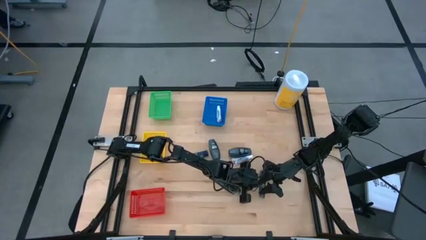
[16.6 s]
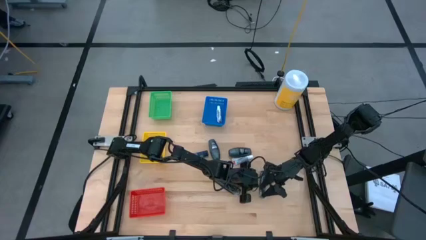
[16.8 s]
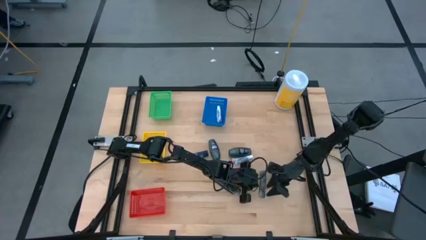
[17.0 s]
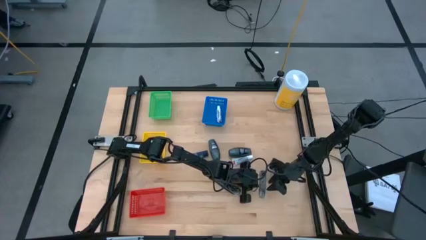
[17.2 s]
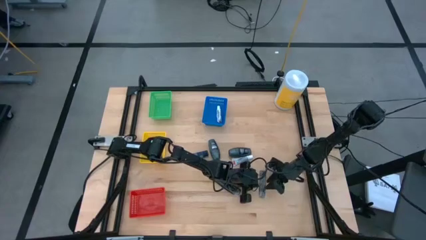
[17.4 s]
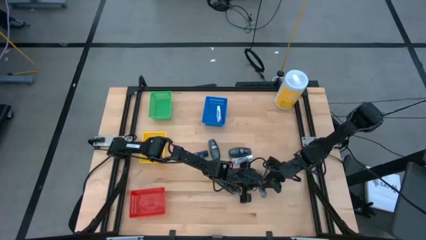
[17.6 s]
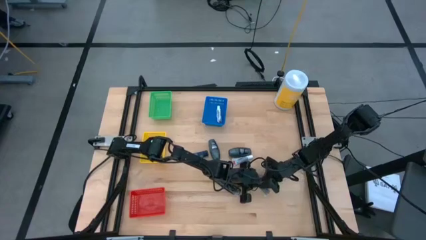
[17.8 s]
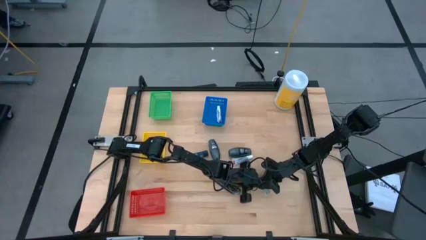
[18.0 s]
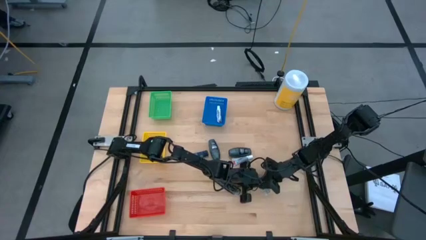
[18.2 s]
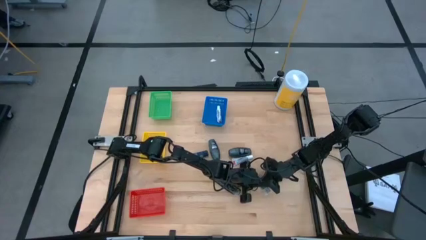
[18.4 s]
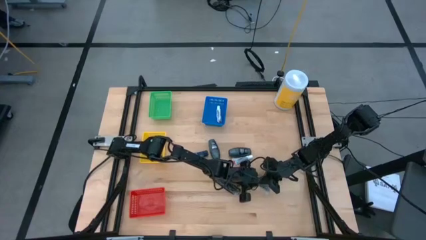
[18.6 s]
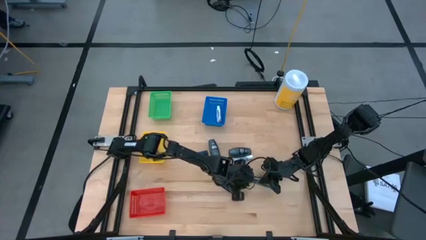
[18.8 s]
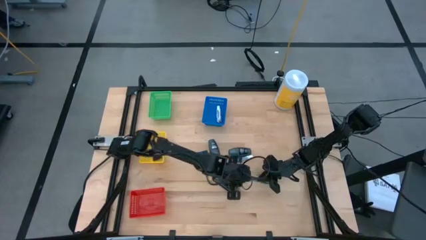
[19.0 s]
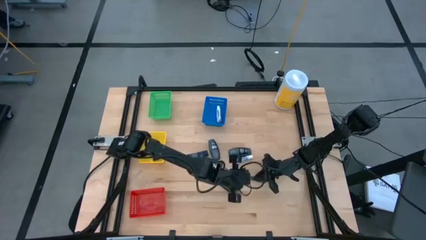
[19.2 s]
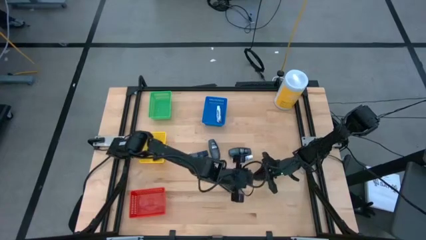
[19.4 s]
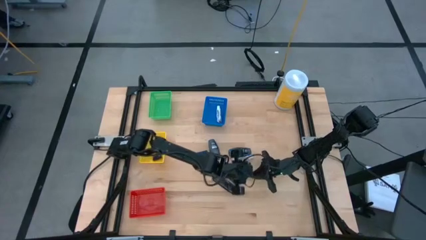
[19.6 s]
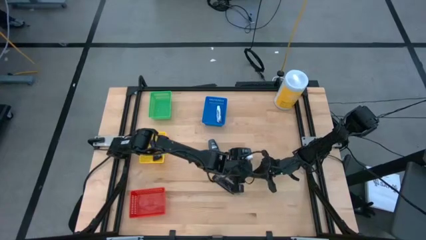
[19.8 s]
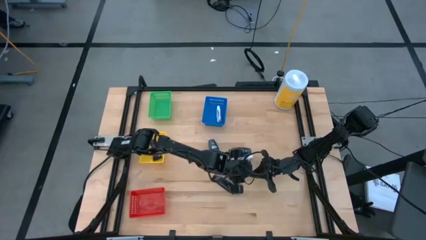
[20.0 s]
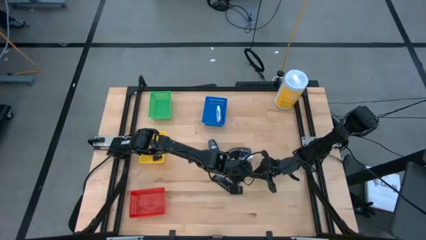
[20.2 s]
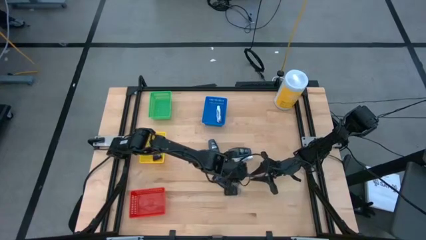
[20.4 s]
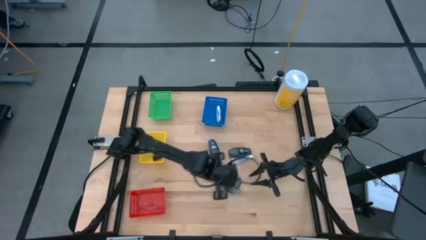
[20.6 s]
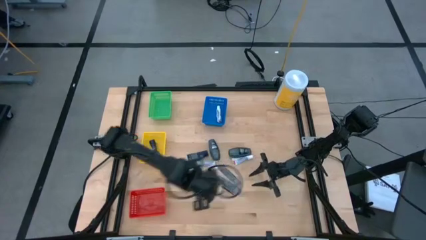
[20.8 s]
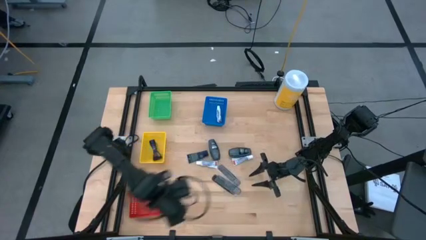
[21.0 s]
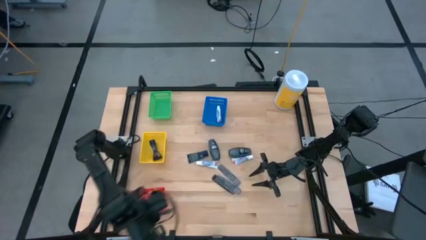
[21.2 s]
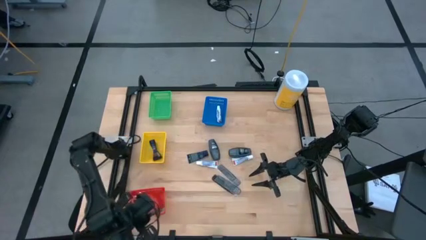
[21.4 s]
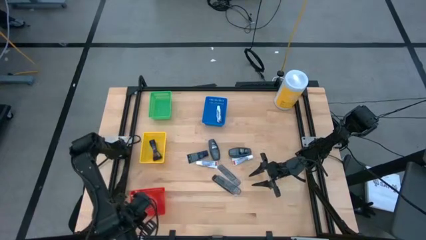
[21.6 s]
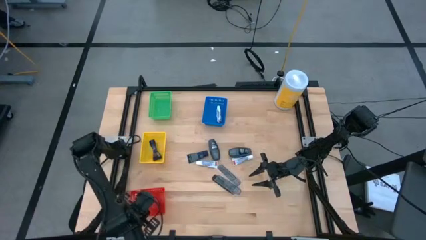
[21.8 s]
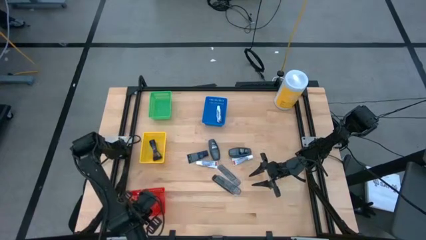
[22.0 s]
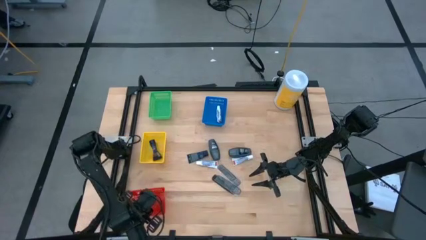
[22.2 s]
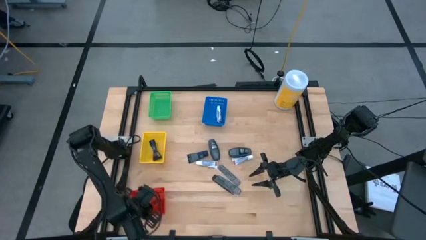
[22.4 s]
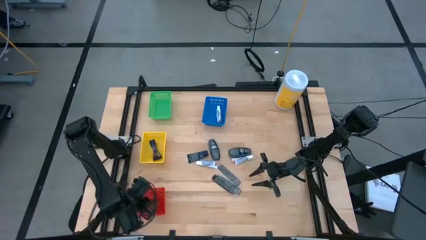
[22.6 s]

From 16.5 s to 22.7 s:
Task: Pick & Place Travel size toiletries
Put the black comb in the red basket

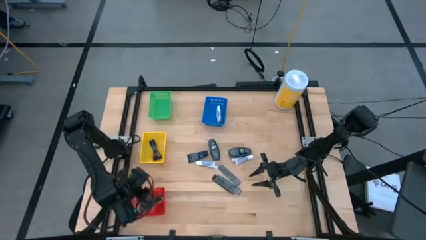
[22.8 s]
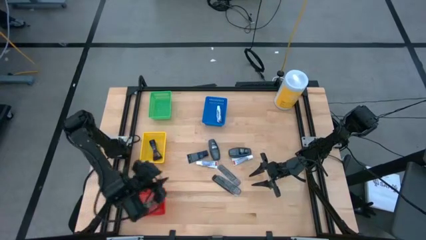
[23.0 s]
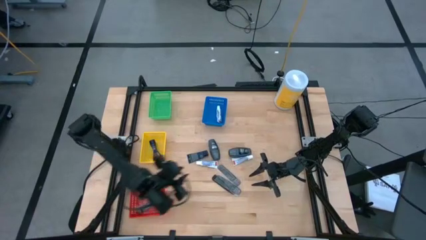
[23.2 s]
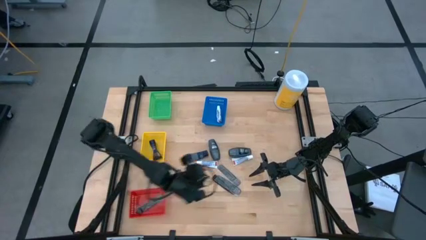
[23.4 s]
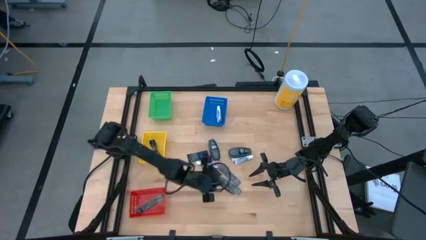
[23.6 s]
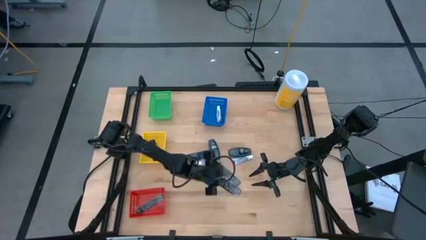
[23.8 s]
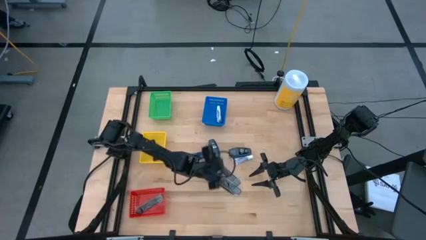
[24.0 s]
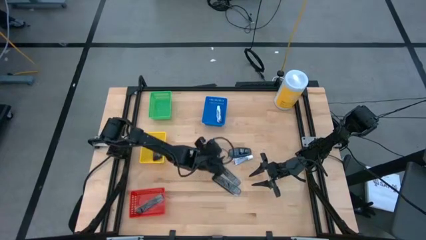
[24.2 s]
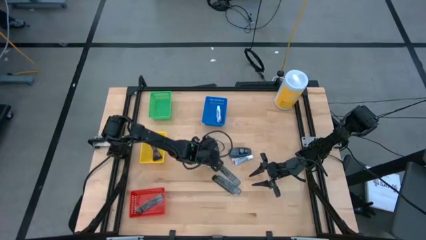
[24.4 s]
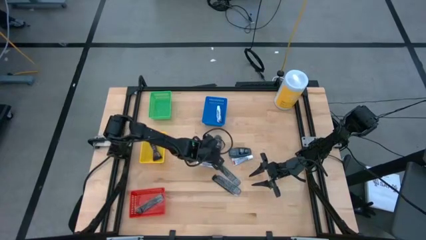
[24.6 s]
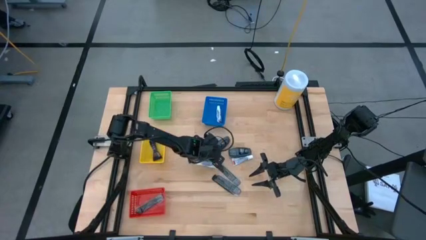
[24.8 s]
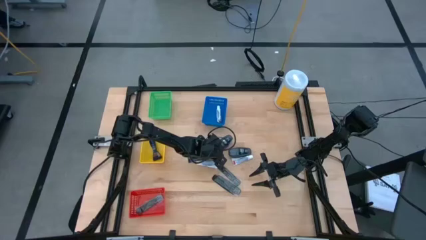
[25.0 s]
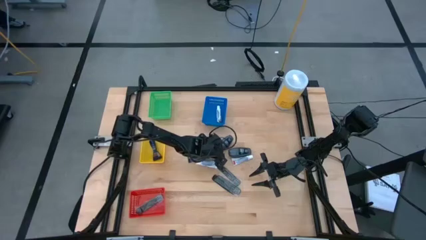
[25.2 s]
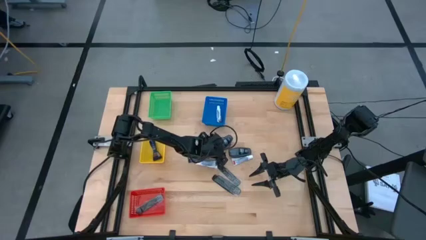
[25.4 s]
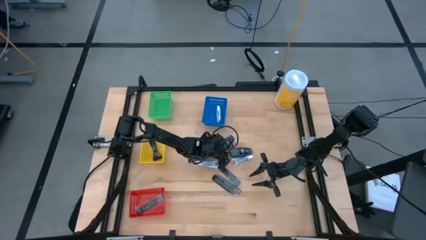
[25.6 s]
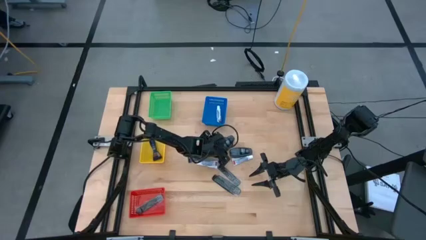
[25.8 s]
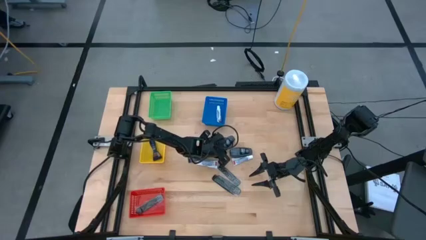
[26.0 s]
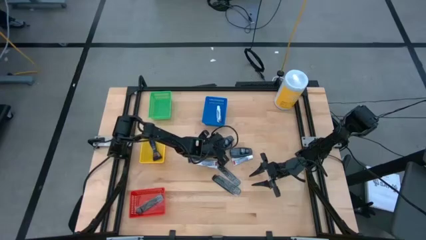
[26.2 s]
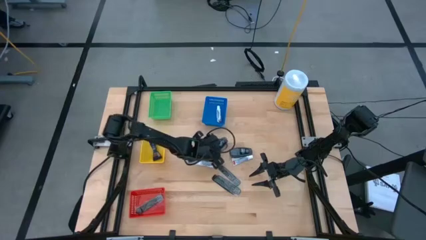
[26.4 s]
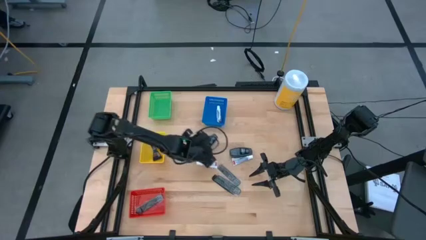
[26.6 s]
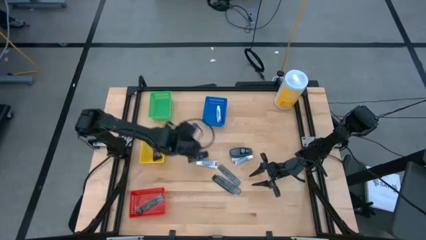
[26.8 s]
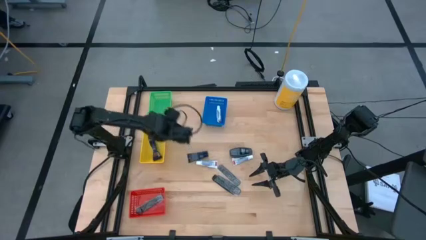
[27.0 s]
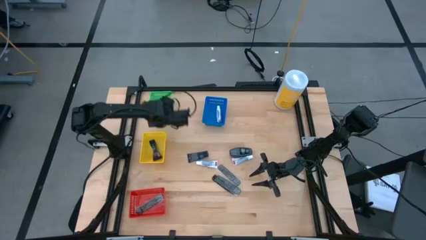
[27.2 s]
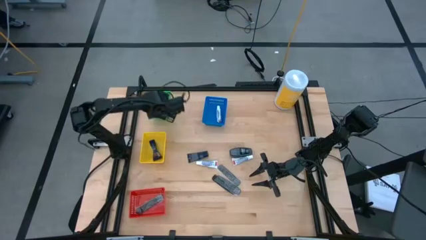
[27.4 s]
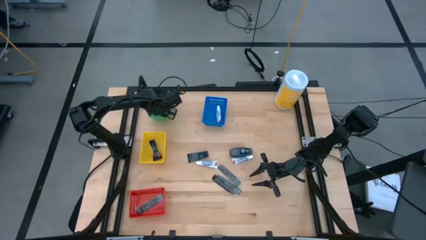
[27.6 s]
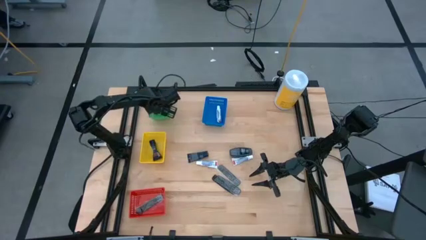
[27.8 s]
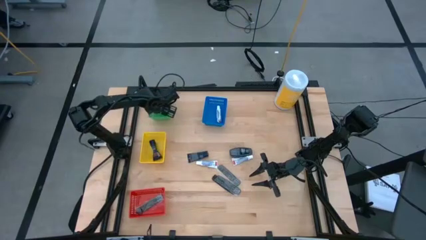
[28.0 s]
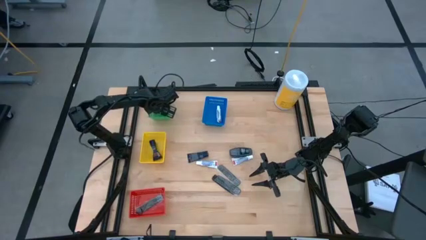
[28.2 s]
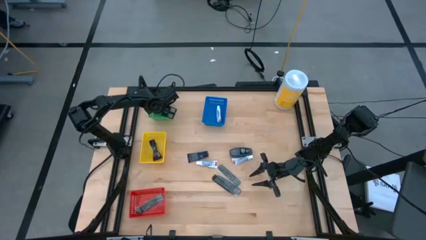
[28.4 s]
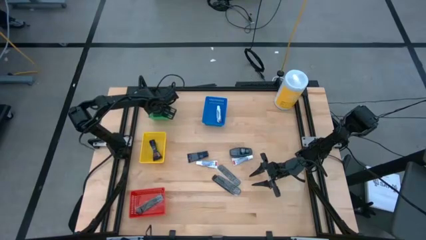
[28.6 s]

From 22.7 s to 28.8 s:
Put the black deodorant in the green bin

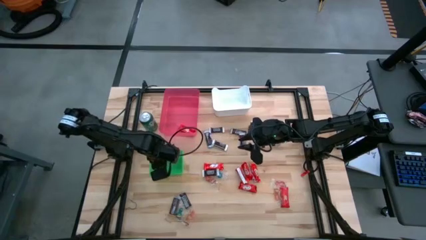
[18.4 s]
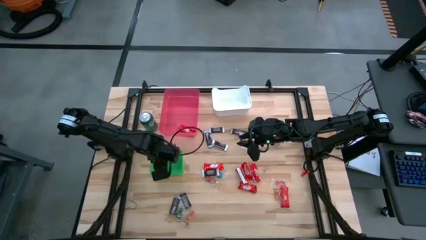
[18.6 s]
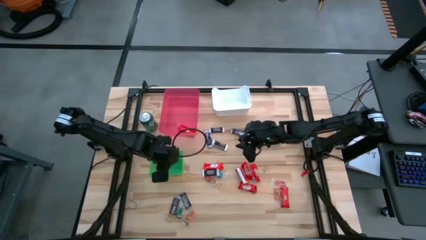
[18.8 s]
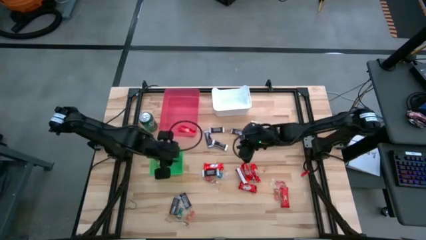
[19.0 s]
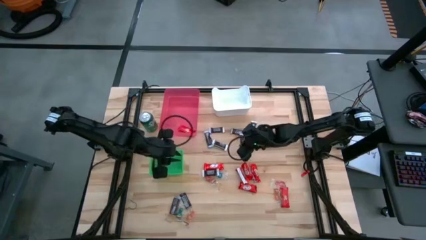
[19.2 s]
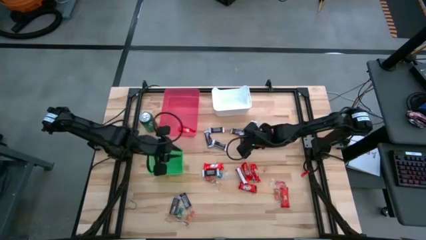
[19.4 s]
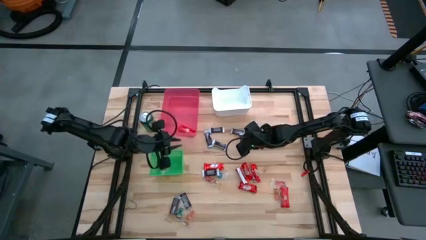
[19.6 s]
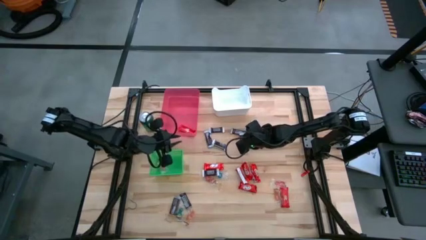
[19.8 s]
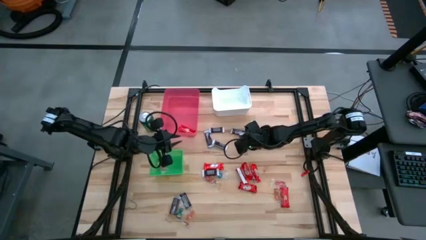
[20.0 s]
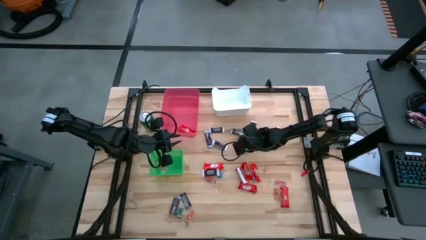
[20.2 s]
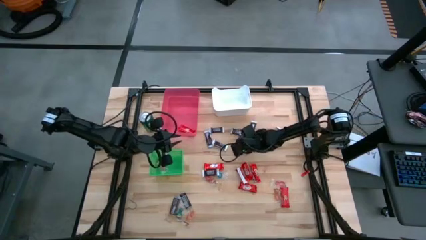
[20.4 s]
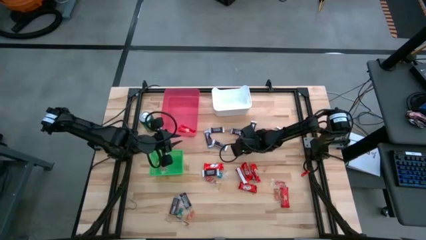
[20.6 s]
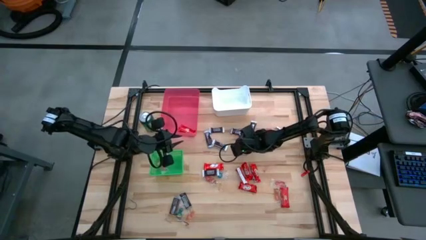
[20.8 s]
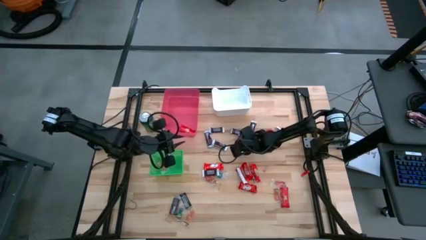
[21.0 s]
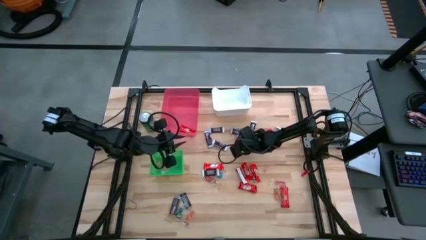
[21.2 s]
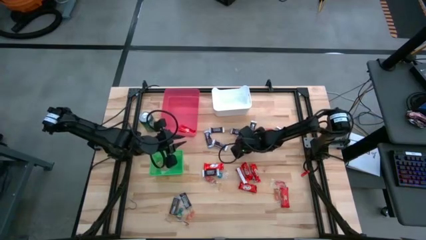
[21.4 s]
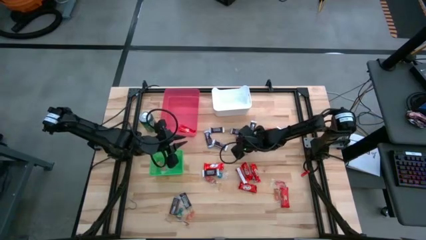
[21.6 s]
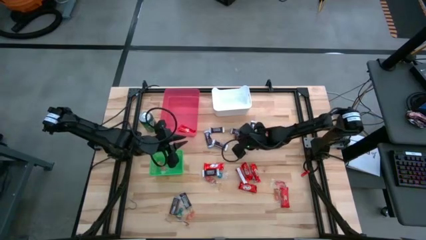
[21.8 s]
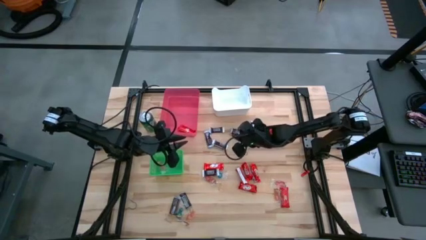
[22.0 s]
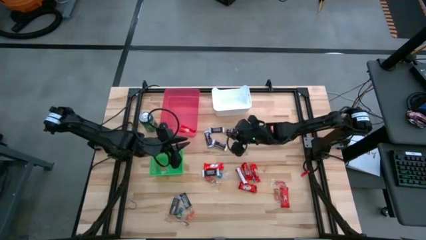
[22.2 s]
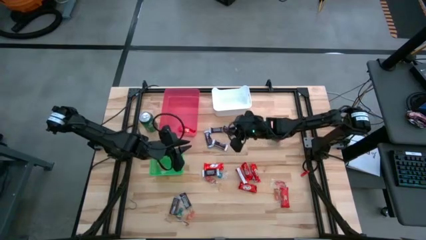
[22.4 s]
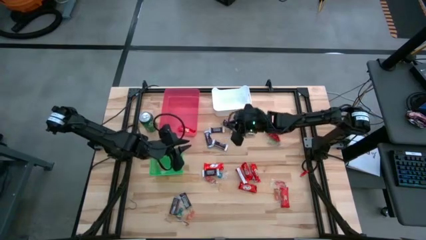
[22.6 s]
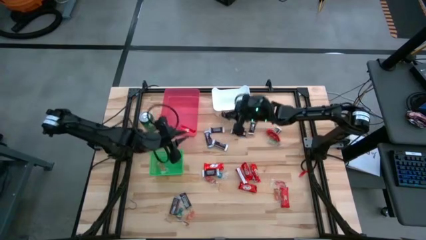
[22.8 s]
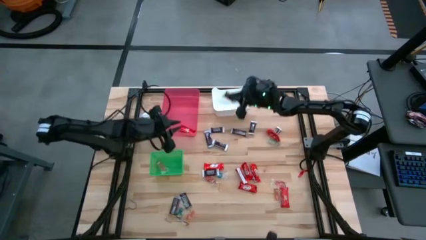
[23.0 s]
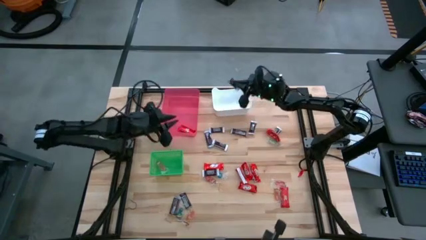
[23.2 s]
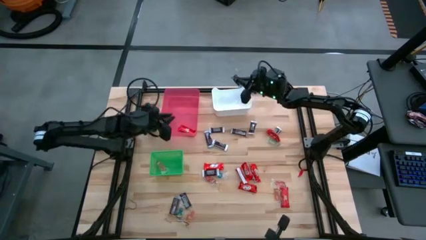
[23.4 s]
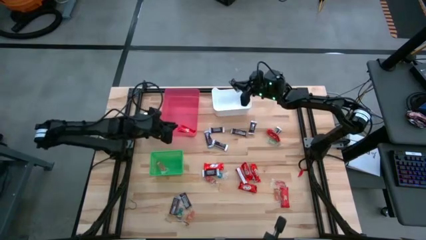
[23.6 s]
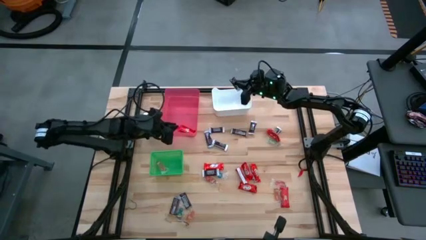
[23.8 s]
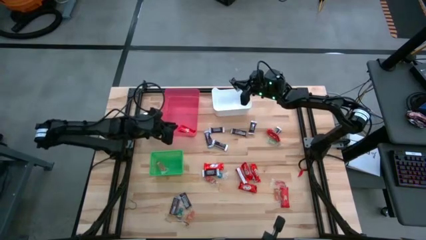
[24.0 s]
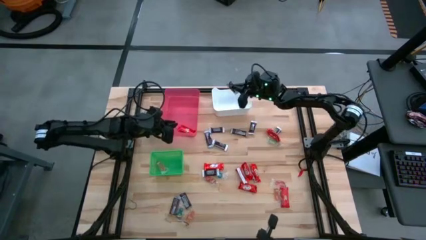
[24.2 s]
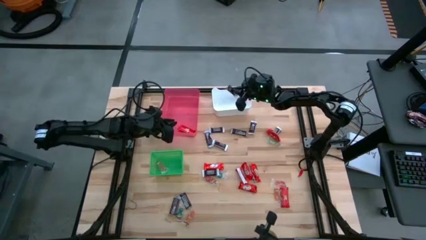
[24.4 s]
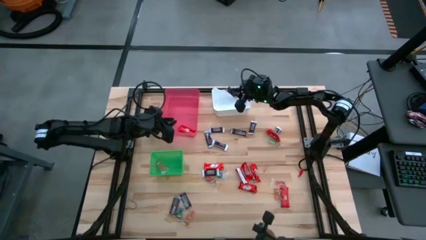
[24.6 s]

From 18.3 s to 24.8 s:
Task: Organize candy in baskets
Put the brown chocolate into the white bin
